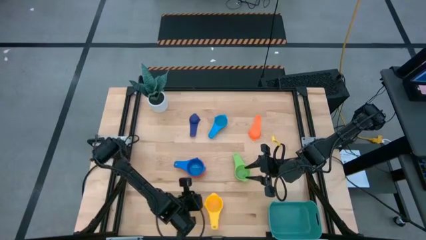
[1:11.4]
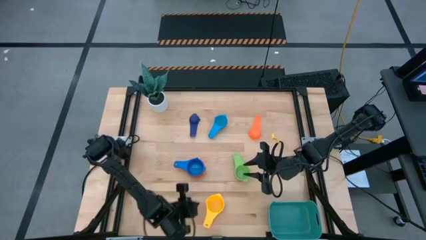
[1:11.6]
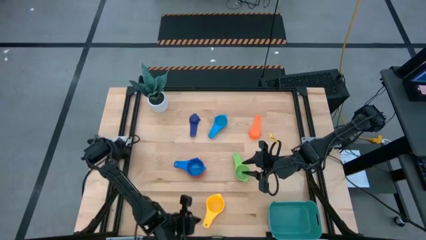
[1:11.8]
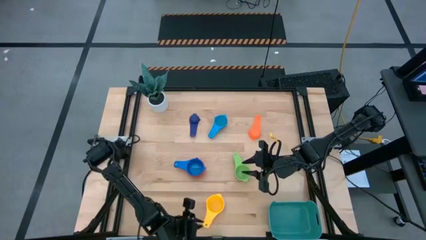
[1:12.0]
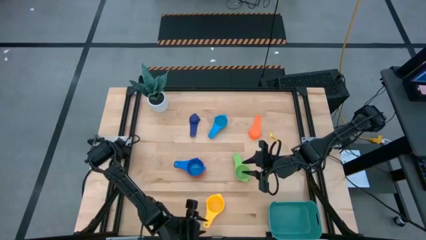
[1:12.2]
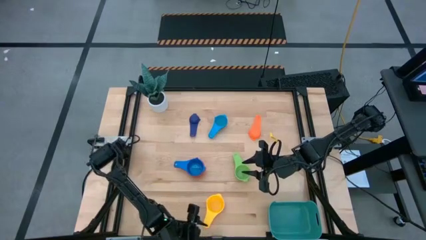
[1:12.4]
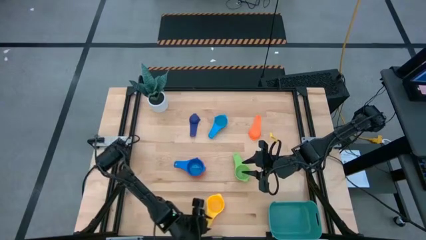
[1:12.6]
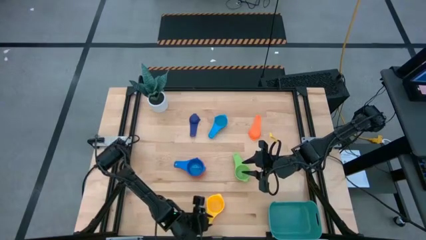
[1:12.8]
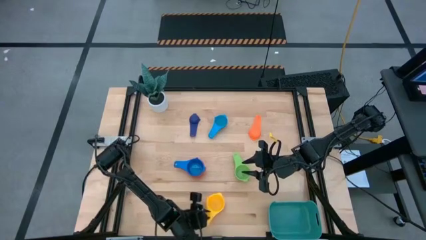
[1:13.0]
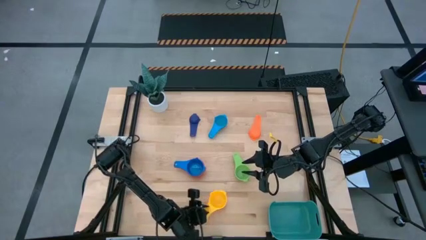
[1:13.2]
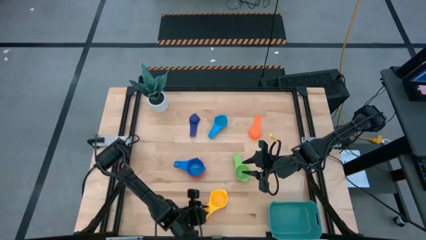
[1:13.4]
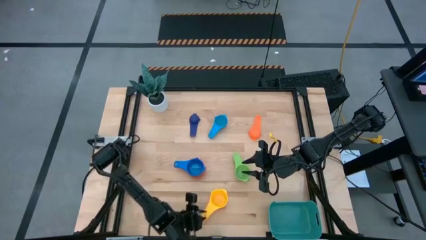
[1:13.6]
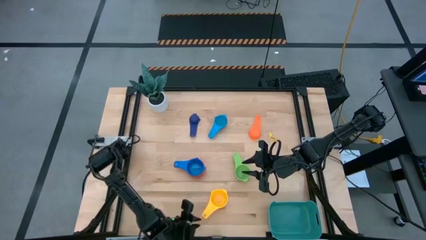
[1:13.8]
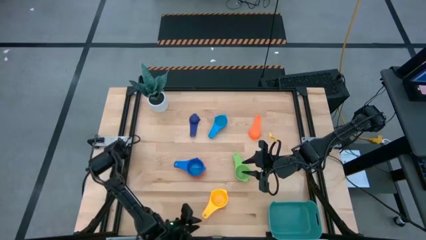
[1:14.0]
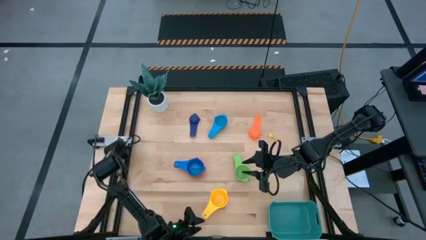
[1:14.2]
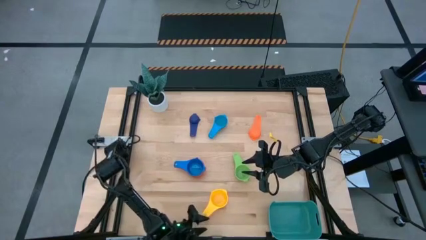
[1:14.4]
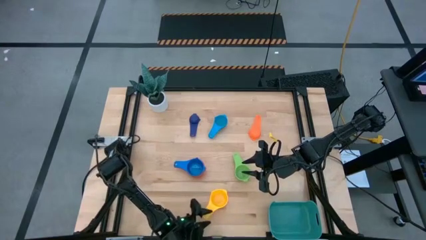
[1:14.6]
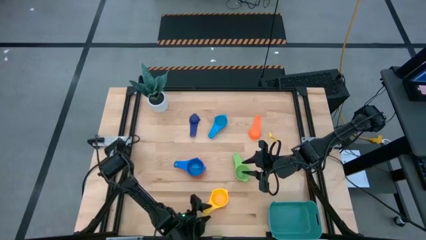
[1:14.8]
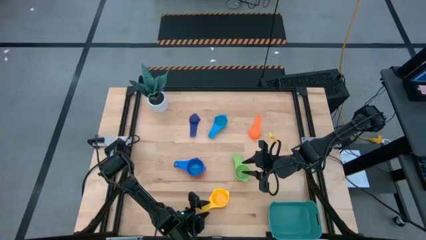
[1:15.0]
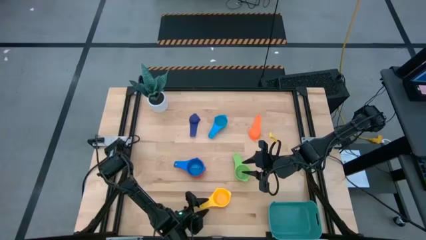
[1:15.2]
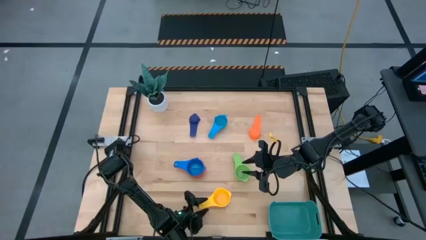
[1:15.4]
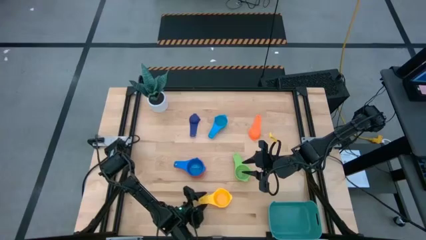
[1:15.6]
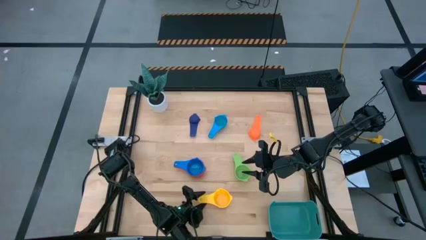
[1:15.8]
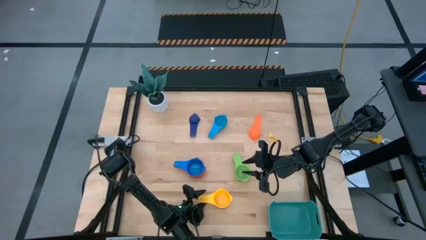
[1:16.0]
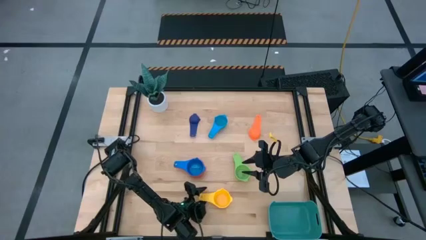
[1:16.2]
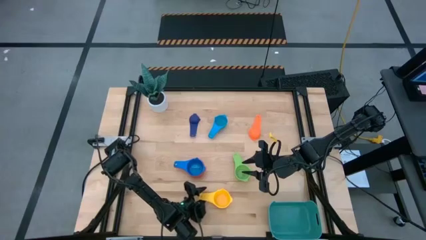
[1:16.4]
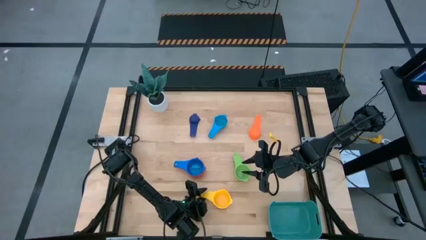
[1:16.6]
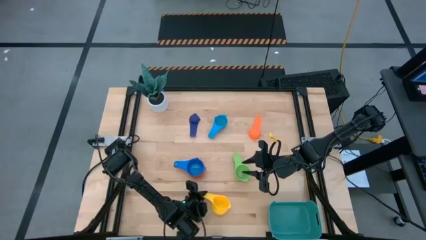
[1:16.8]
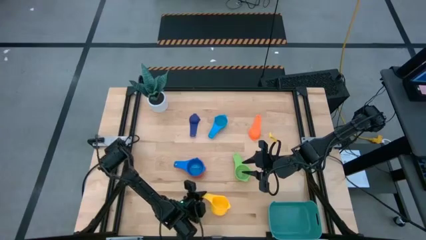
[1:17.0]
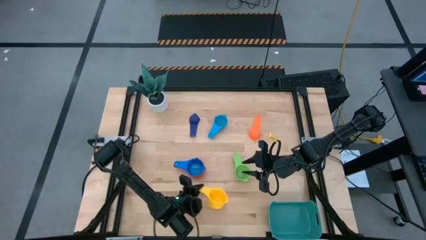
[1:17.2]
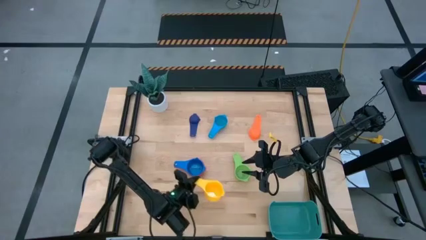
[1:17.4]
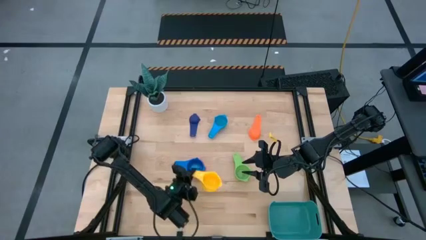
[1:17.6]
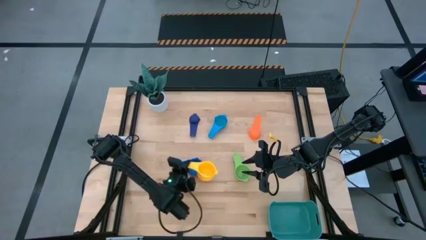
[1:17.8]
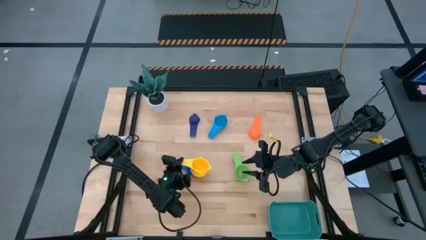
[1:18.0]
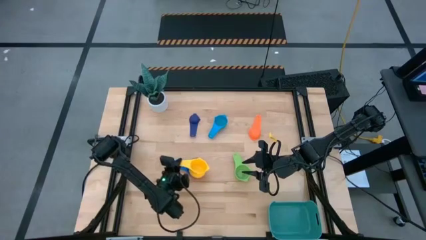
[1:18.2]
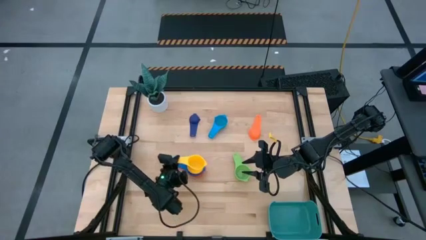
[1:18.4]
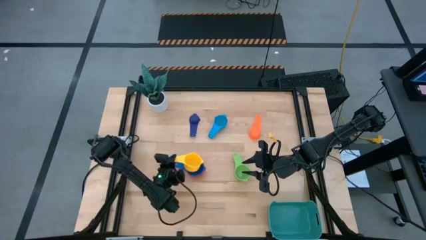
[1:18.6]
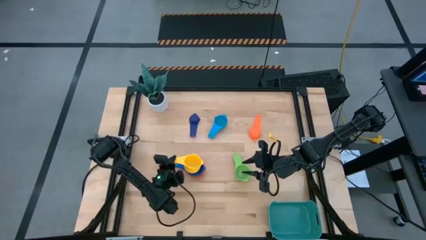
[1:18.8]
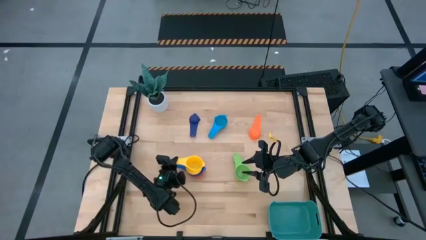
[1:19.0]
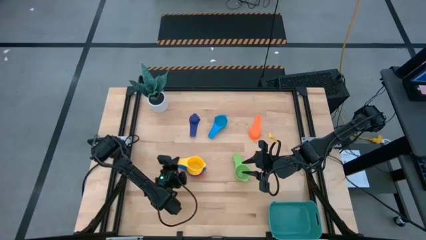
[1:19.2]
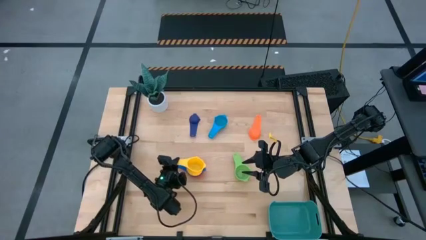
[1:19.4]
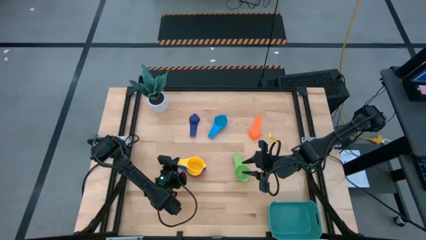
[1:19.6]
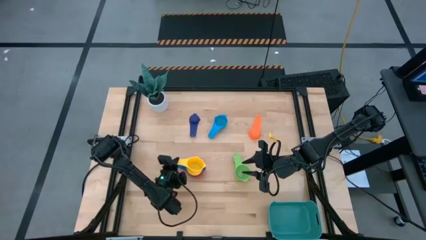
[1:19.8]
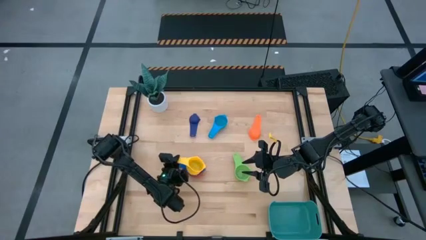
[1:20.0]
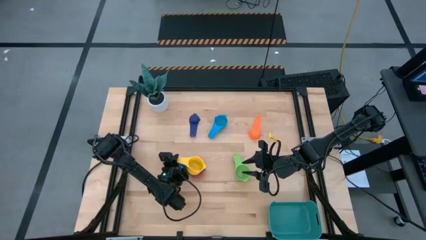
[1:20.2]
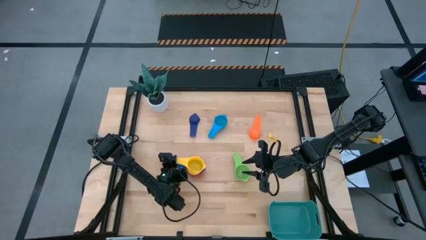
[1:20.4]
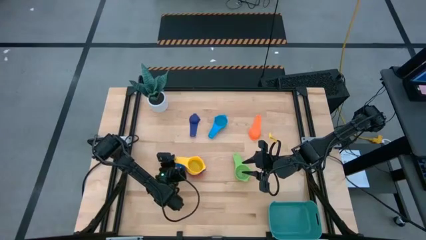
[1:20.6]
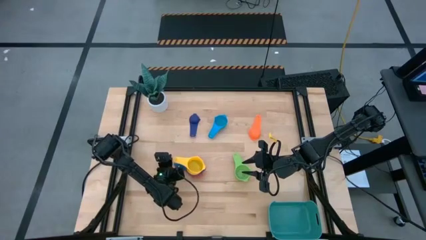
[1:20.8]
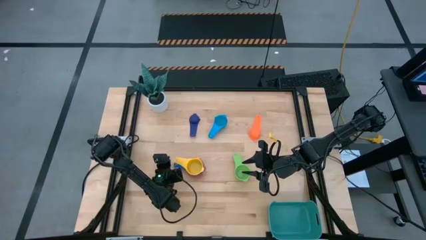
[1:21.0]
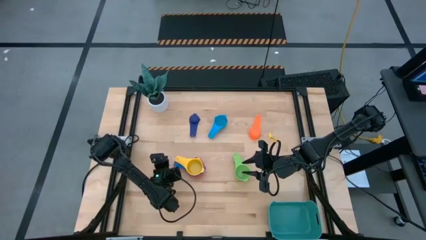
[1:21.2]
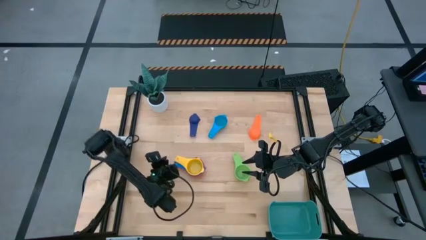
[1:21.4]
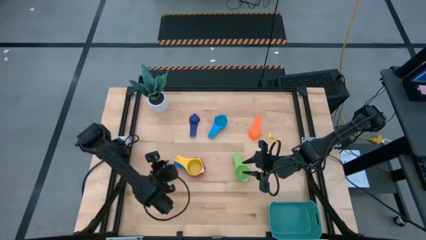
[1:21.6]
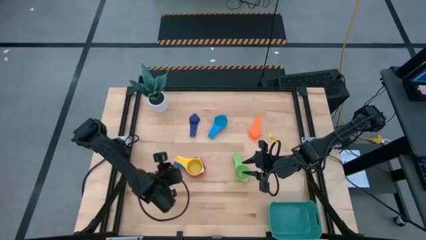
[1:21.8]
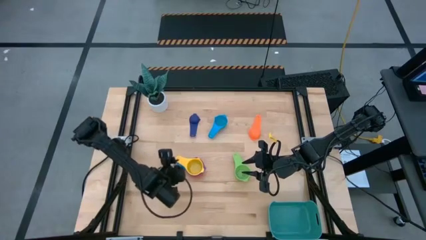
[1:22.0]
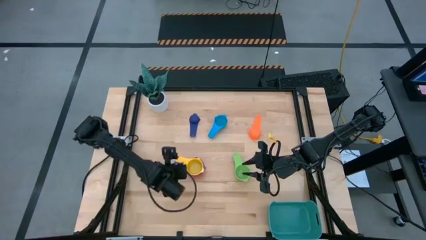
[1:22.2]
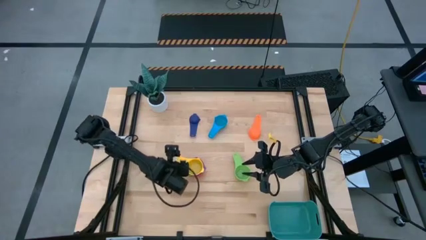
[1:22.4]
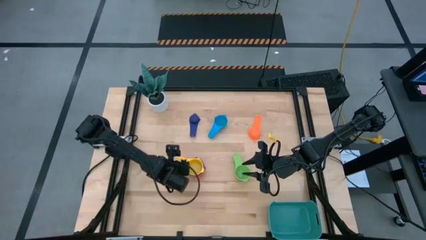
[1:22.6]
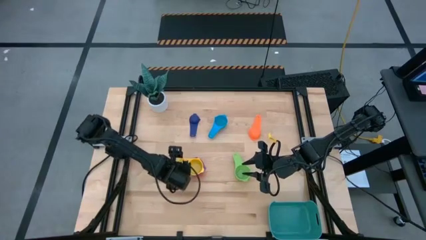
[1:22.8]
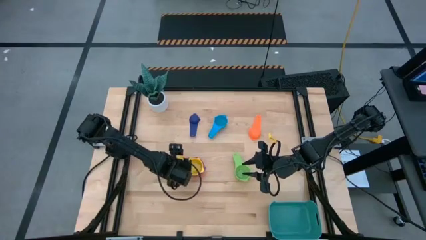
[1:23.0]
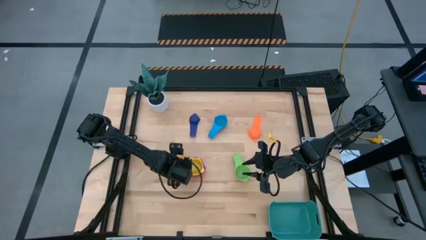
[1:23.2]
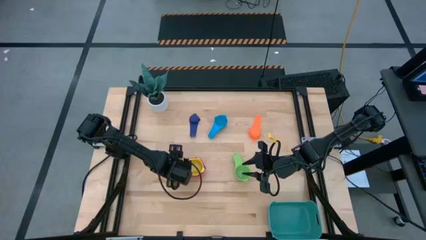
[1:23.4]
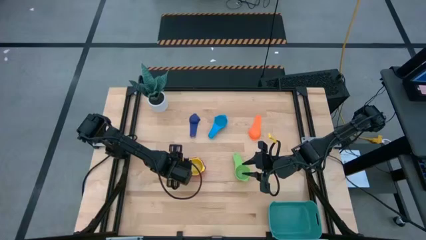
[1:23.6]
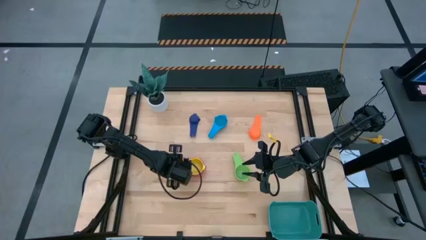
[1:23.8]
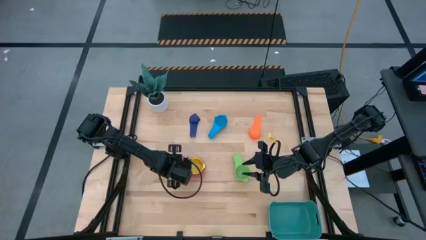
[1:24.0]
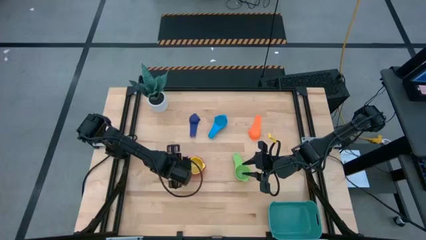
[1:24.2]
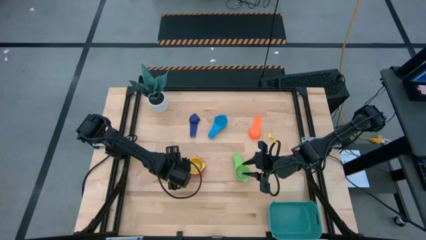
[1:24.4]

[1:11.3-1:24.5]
Task: Nest measuring cups in basket
Stack the yellow measuring cup on top of the blue measuring cup

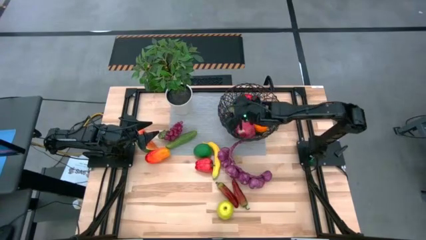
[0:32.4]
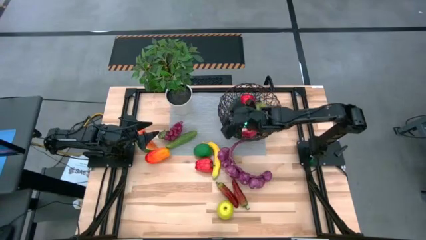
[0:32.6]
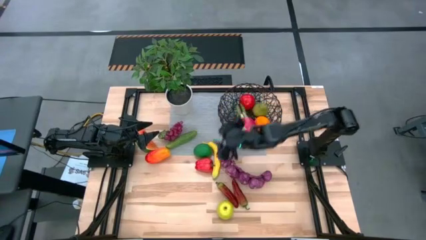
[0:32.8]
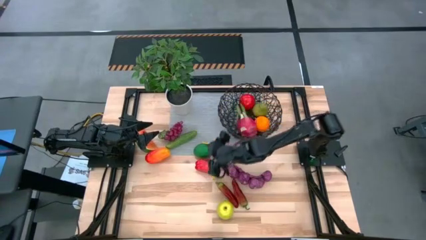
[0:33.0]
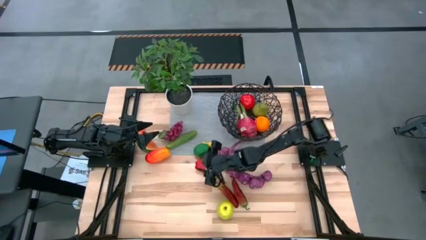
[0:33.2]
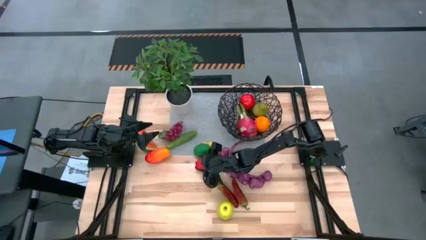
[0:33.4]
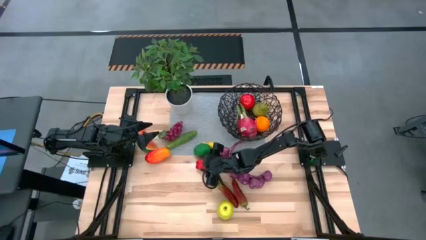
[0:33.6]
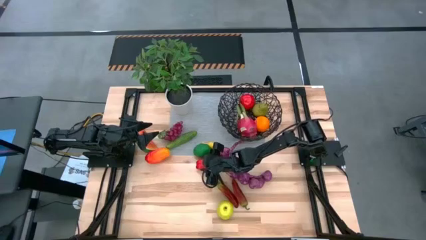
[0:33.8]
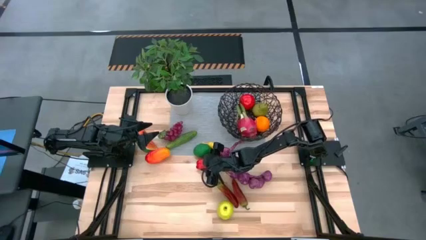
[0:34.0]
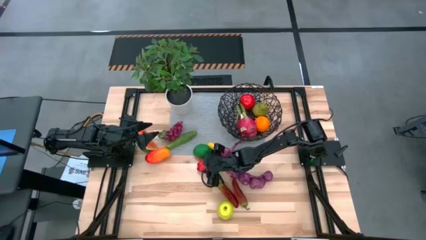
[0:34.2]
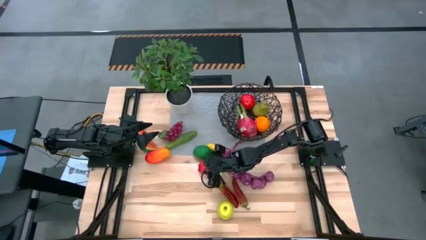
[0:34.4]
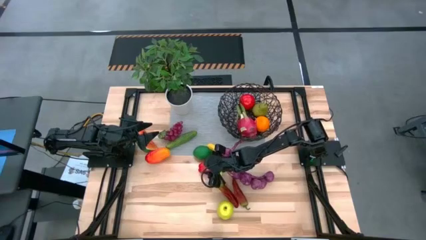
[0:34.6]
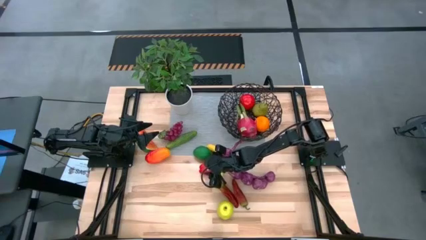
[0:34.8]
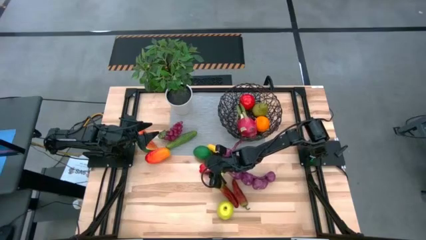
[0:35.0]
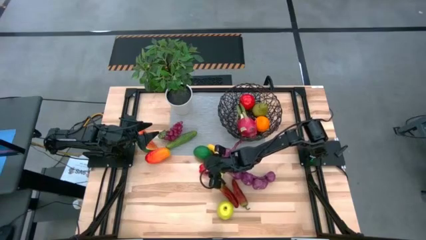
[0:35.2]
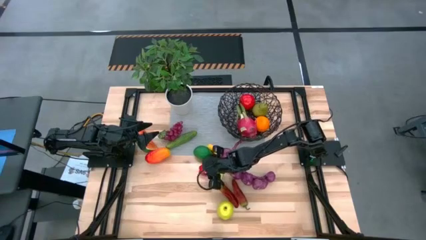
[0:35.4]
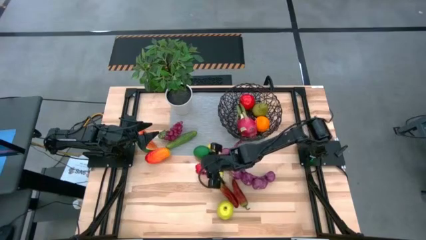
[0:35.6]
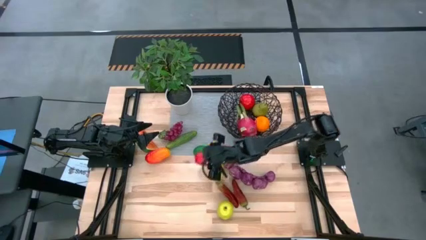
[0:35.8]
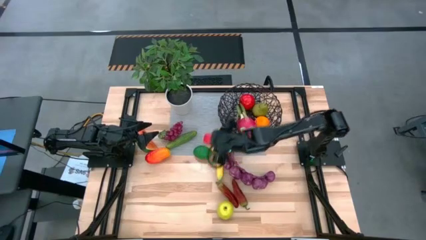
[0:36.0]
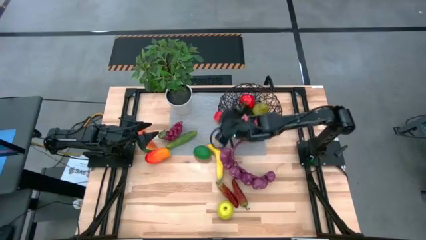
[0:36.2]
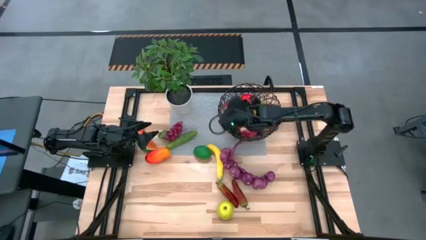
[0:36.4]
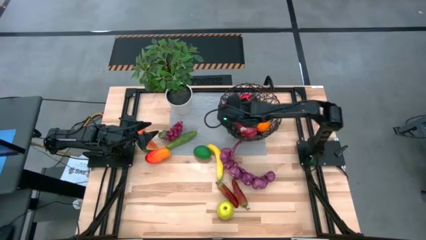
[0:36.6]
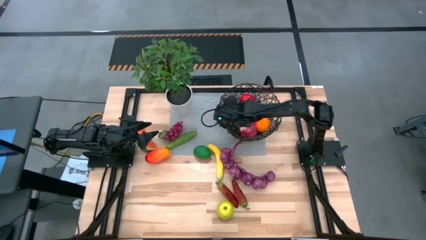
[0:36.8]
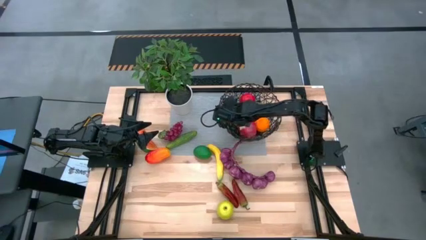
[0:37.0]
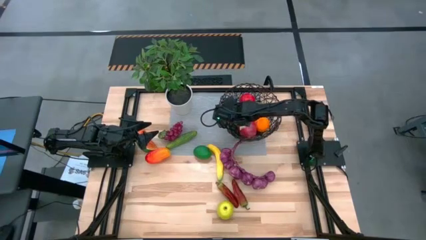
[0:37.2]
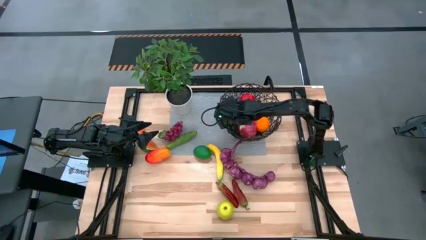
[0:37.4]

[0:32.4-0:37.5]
Task: Build produce basket
Put the red bell pepper into the wire basket
